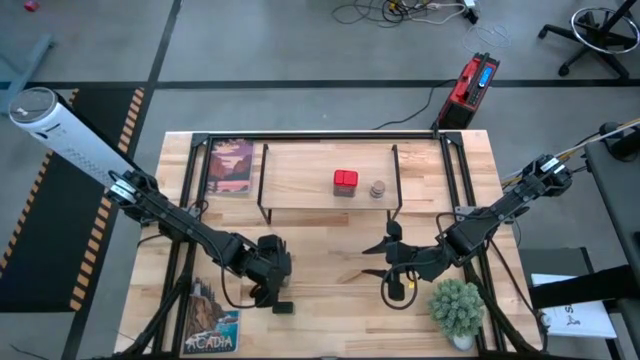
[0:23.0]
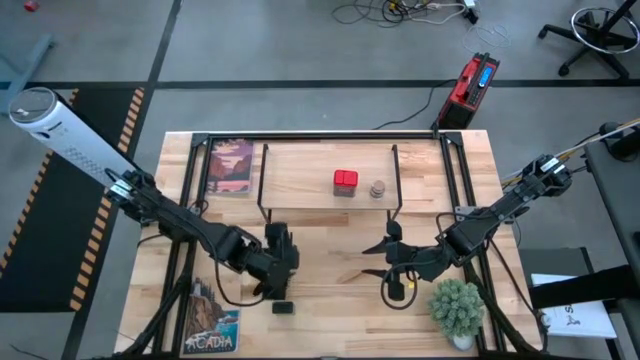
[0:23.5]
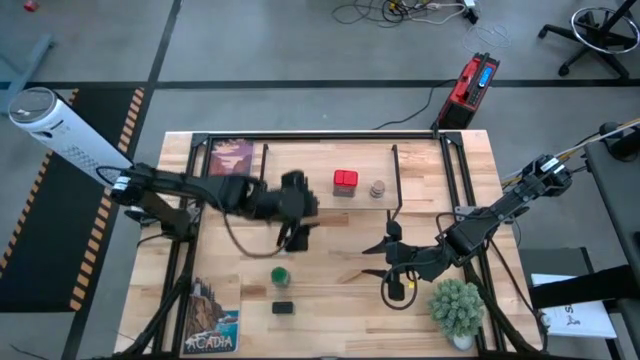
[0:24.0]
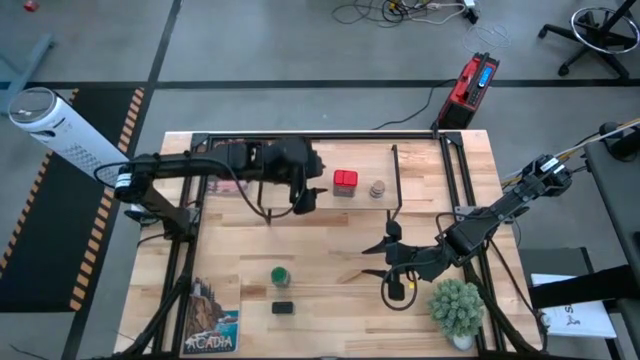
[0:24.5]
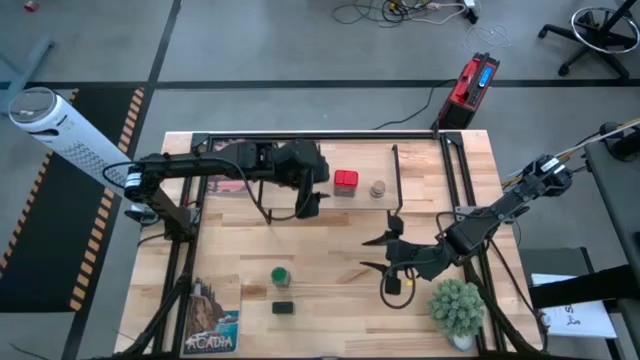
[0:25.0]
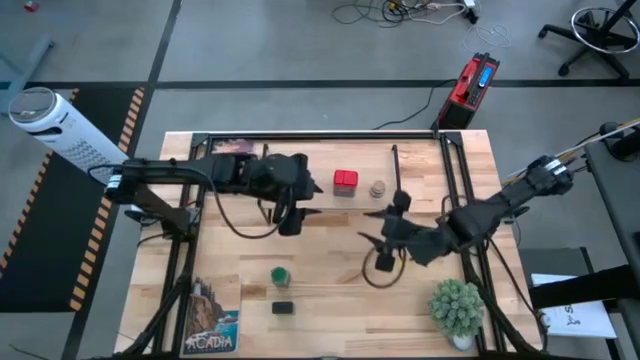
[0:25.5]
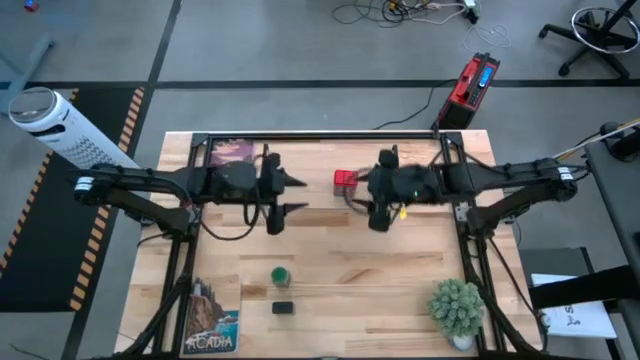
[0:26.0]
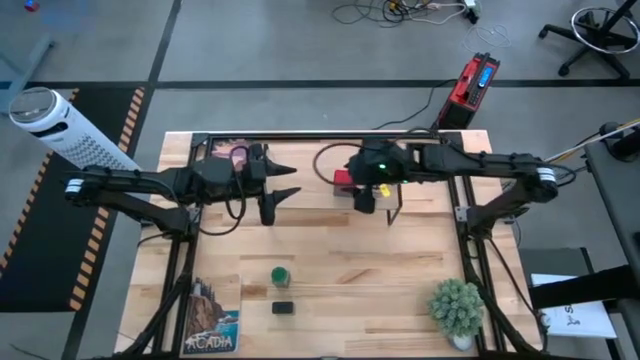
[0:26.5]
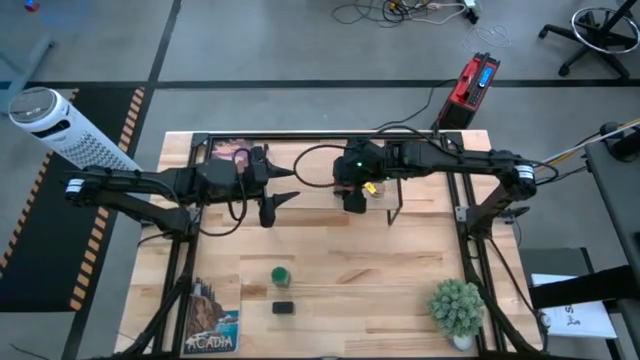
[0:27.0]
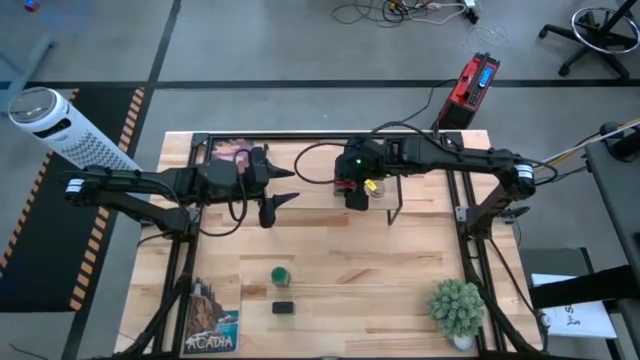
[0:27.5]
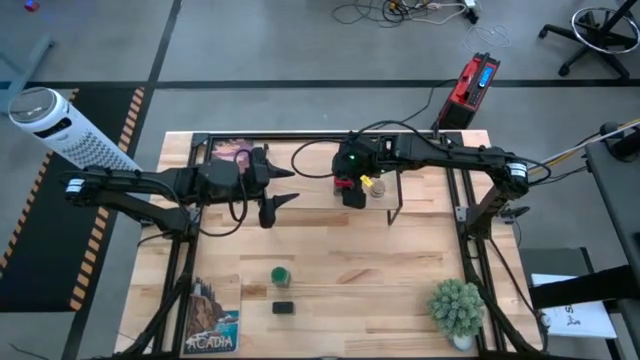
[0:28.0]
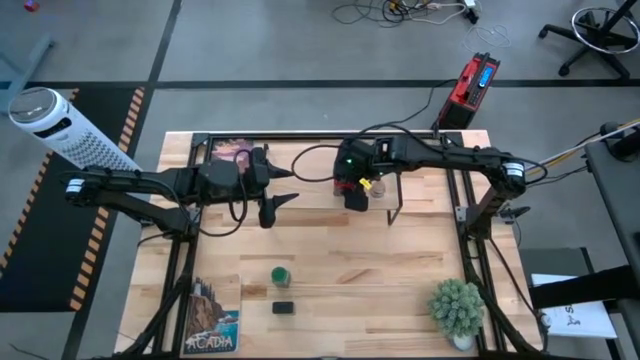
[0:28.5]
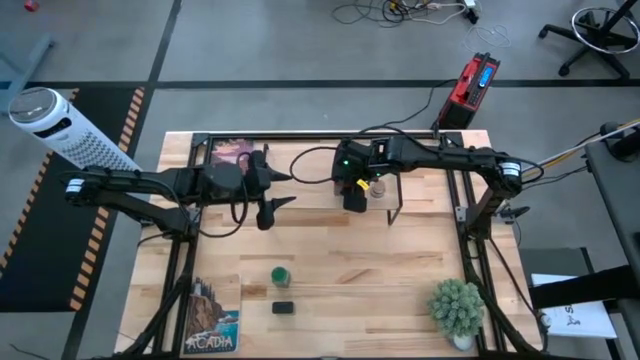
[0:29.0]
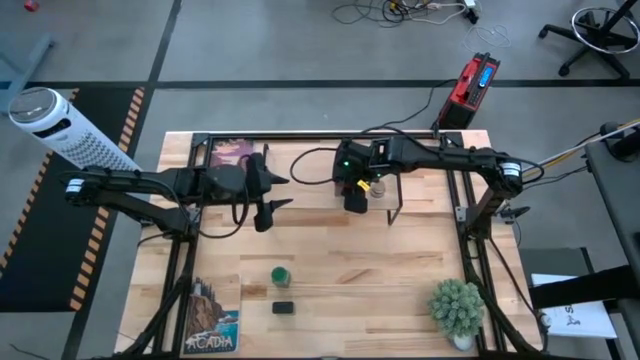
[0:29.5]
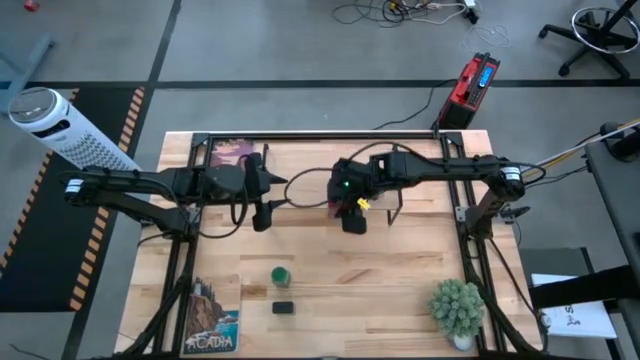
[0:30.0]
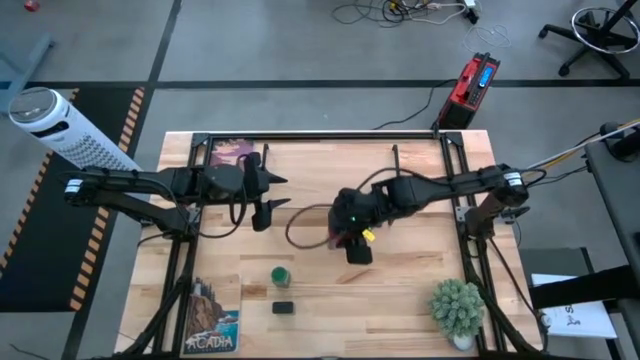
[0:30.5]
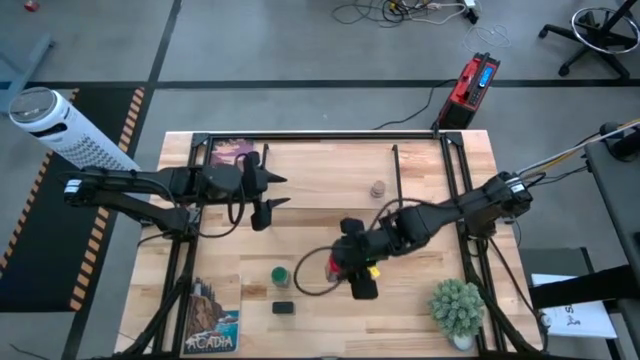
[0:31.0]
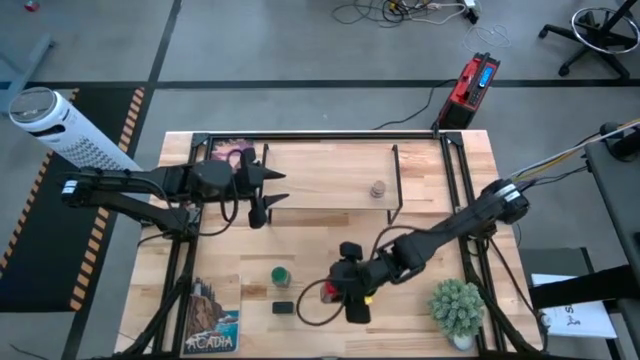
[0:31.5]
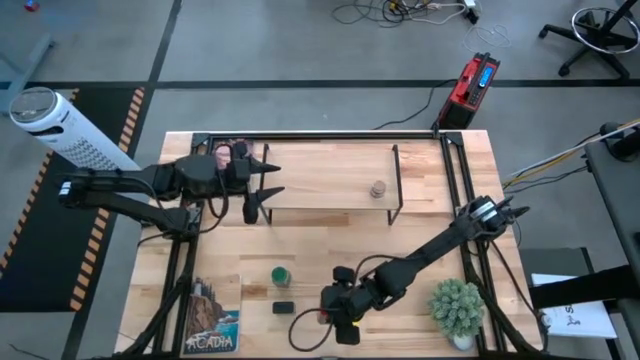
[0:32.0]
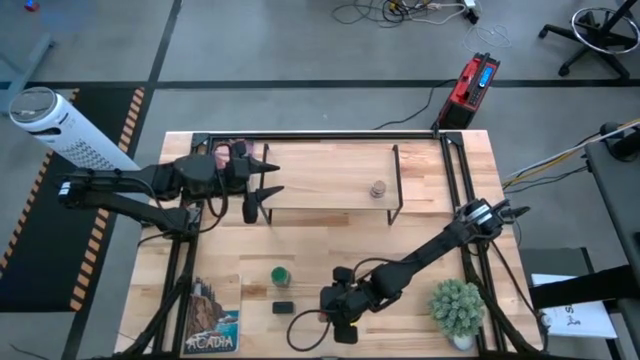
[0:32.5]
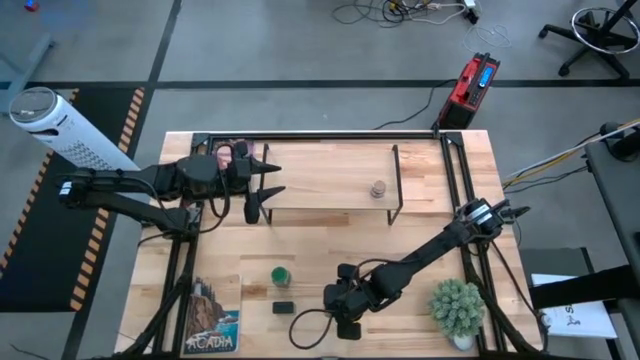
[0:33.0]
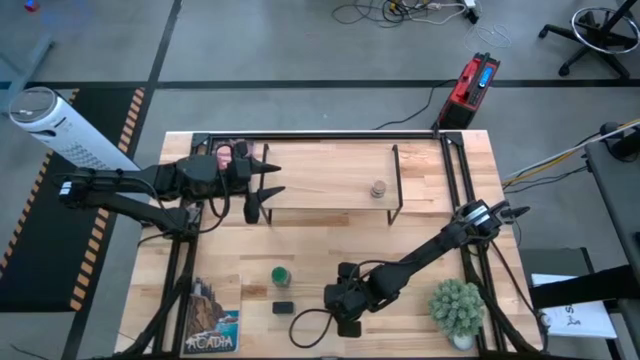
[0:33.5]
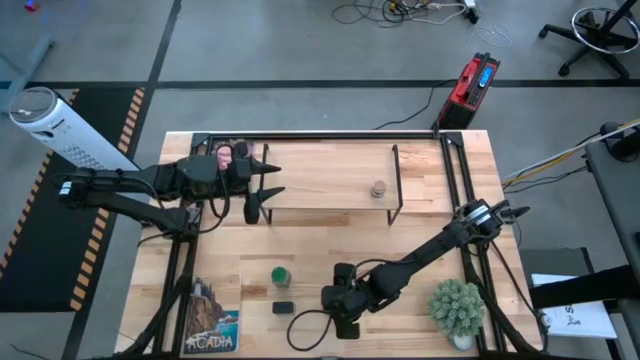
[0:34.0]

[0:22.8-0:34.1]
Task: Shelf spices
Remove the red seasoning can from the shelf

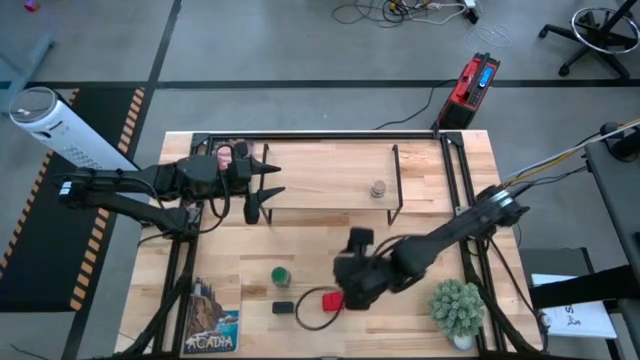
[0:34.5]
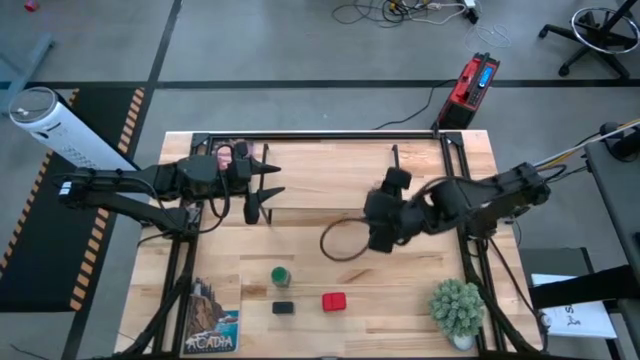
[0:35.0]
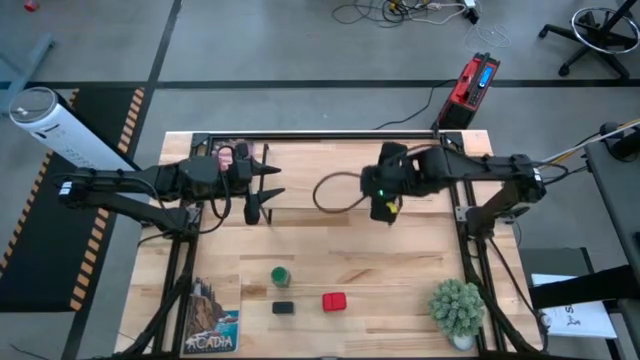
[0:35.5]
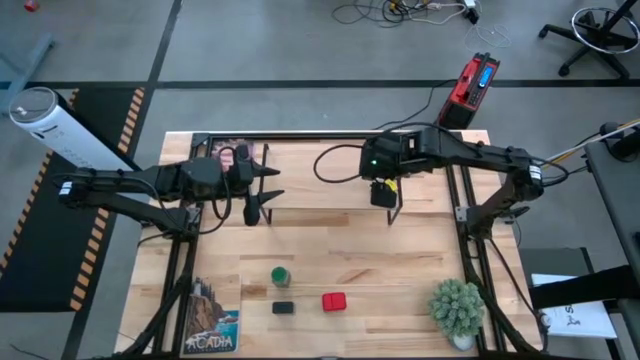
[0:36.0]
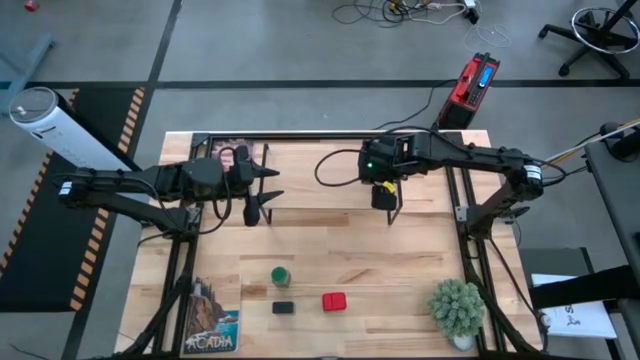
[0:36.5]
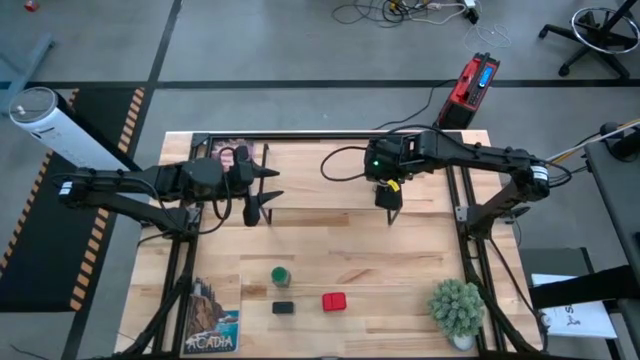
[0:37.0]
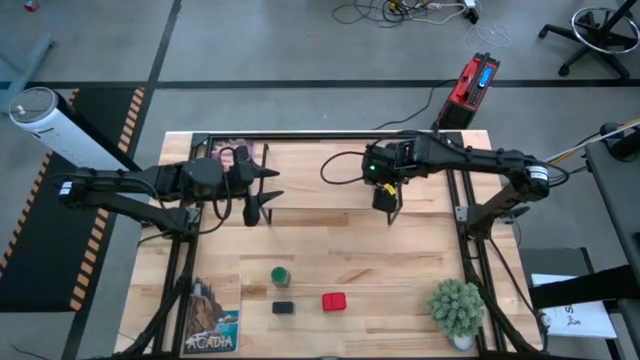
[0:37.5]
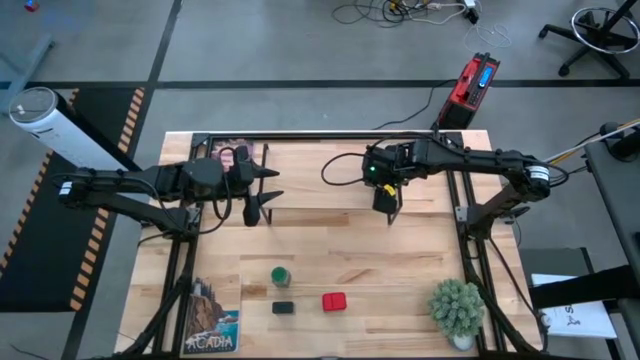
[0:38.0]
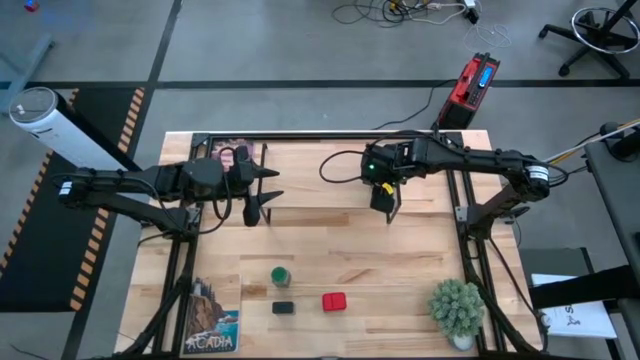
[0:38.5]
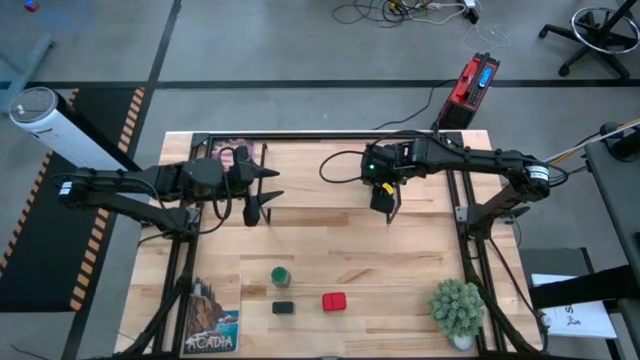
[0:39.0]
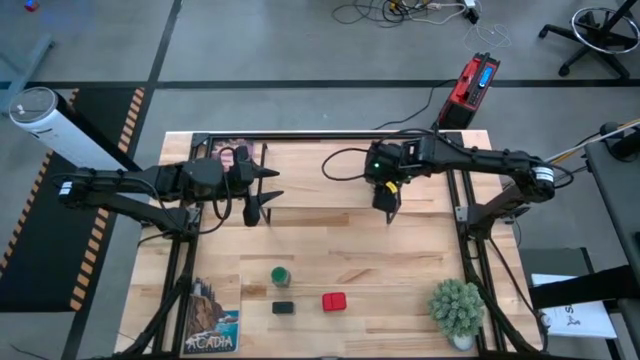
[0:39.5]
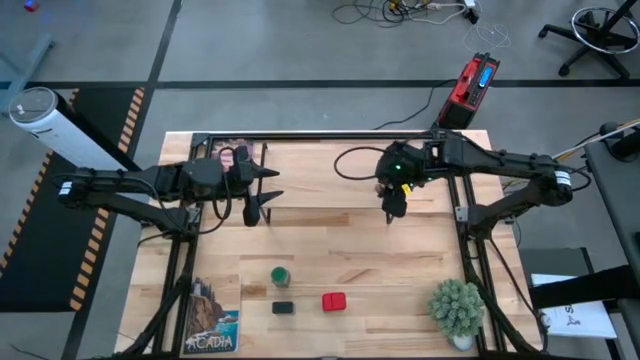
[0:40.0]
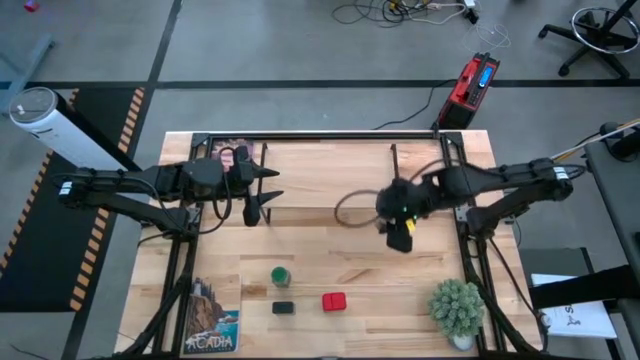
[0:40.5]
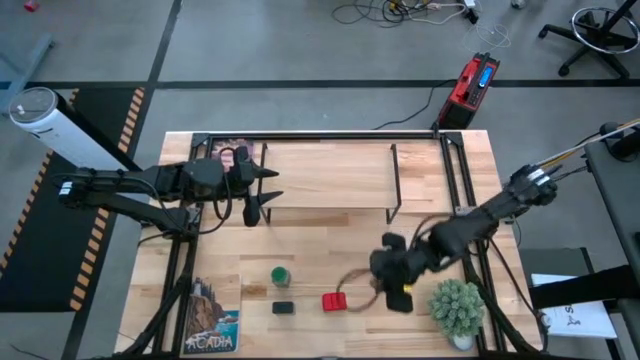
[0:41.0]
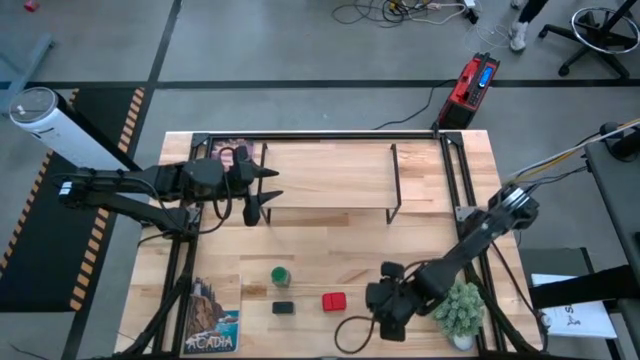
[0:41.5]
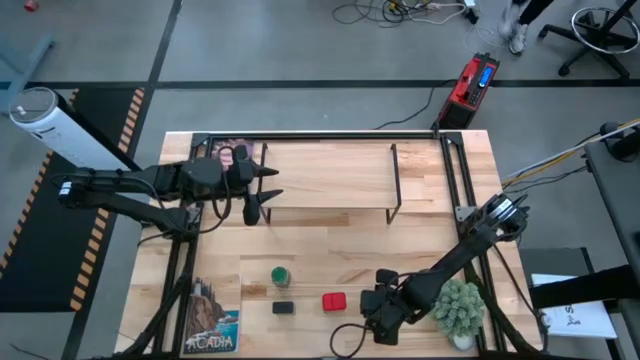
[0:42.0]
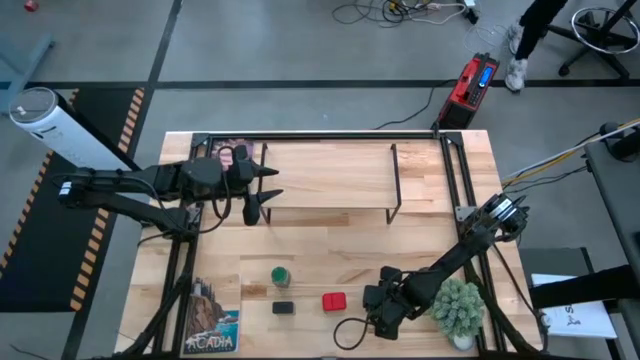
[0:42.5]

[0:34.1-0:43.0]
Remove the transparent seasoning bottle from the shelf

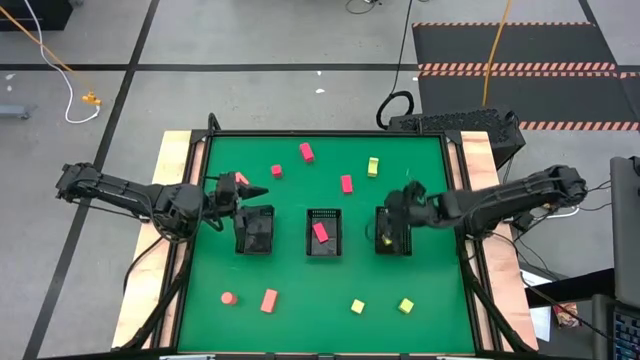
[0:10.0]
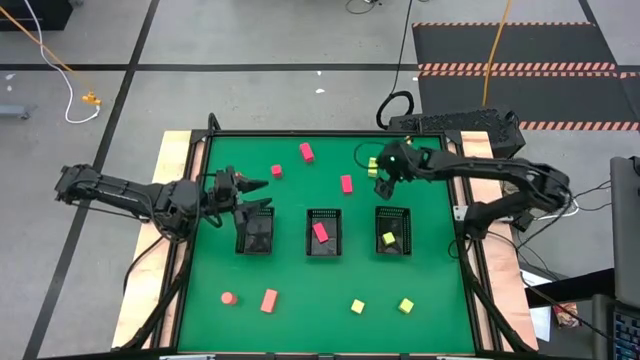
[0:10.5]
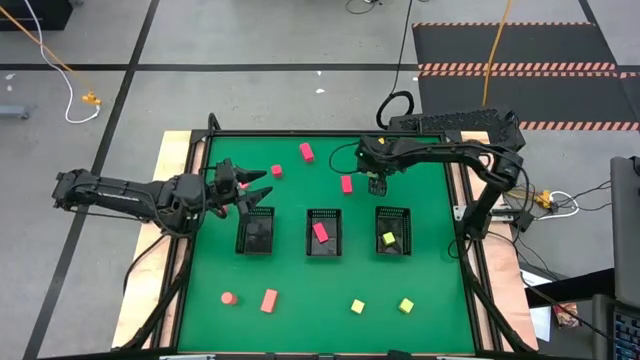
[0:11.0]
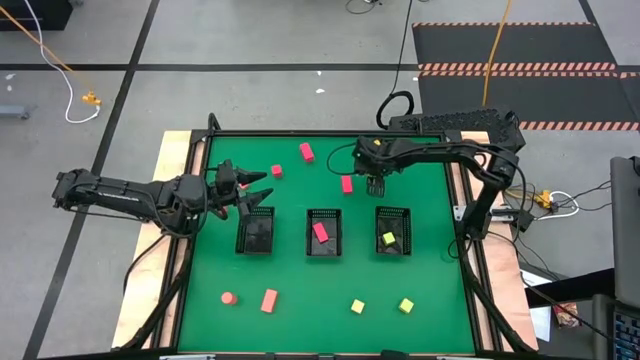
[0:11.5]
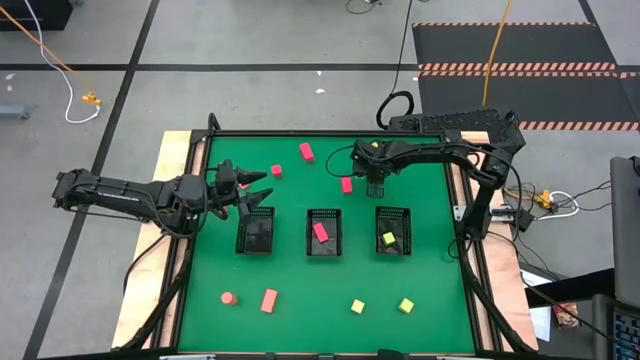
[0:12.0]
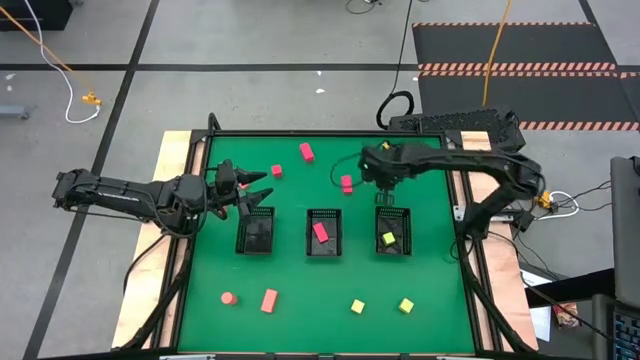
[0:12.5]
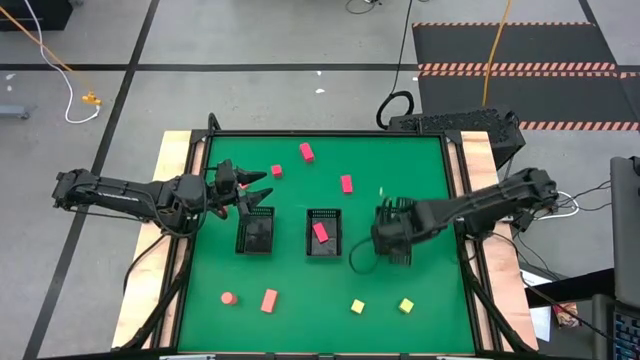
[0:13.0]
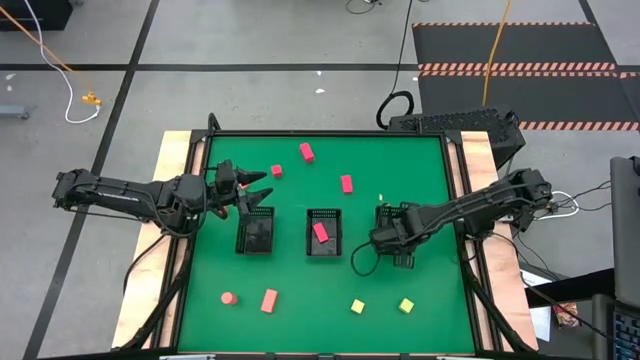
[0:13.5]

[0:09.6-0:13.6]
Task: Sort & place blocks by color
Put the green block into the right black basket
